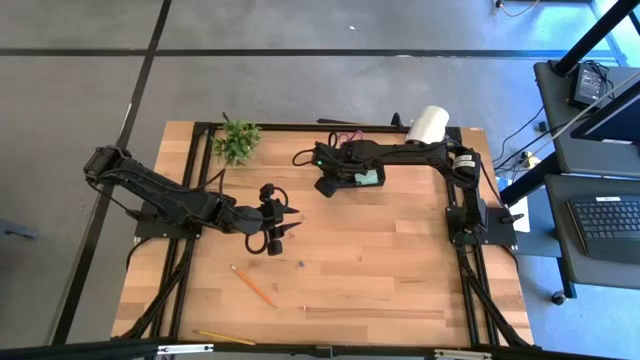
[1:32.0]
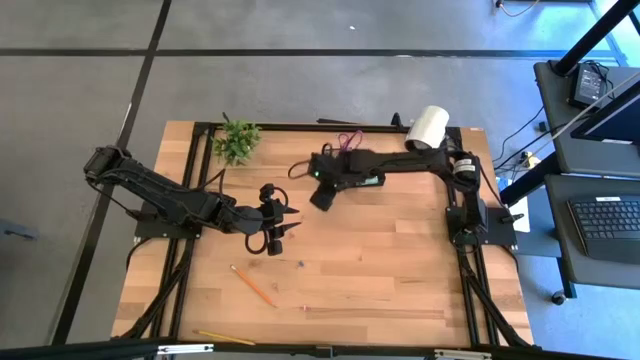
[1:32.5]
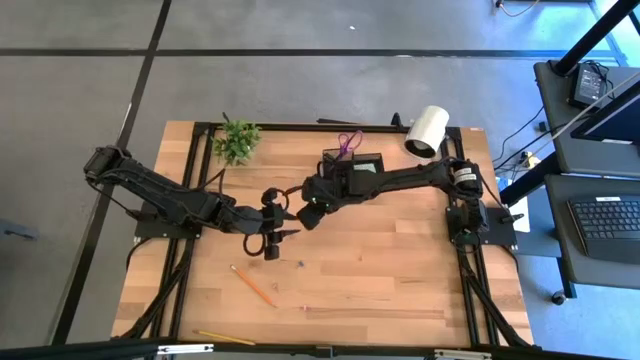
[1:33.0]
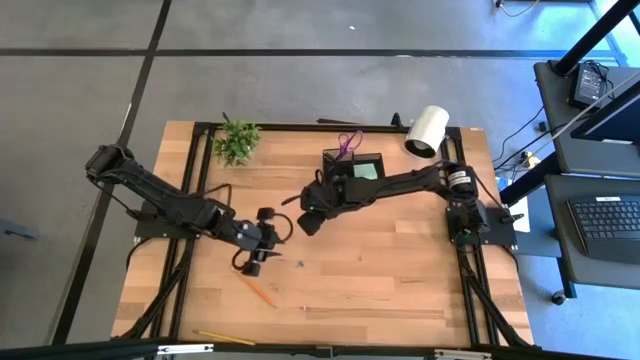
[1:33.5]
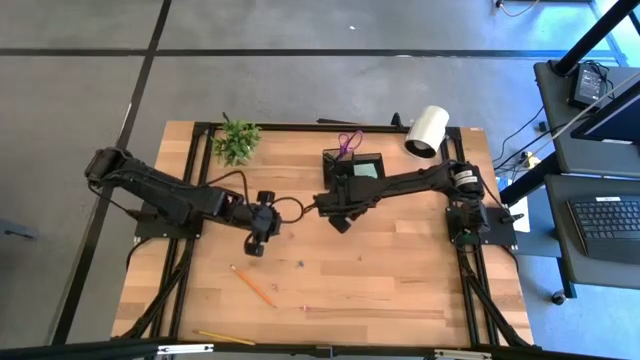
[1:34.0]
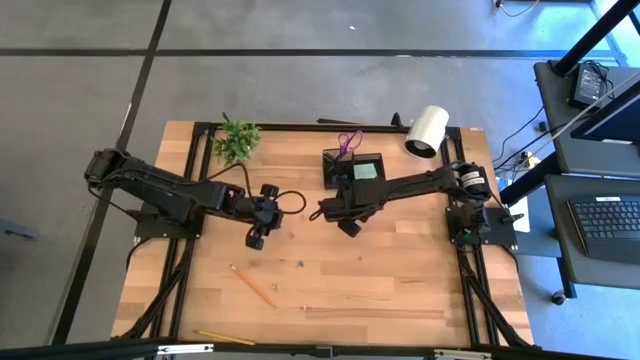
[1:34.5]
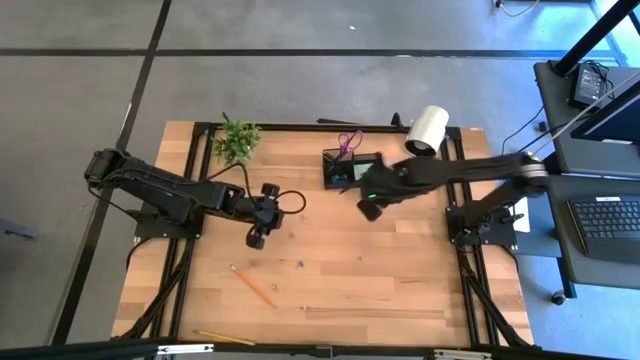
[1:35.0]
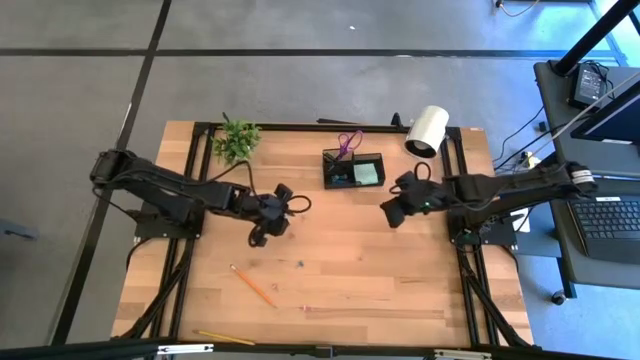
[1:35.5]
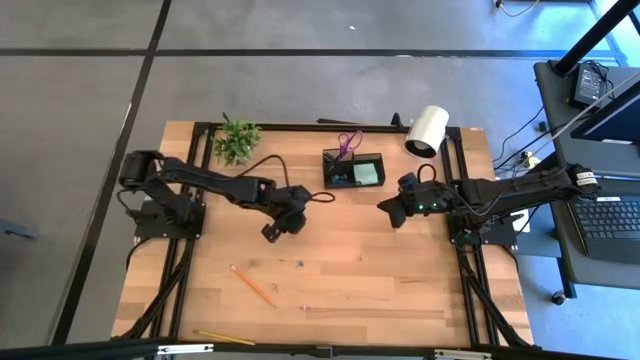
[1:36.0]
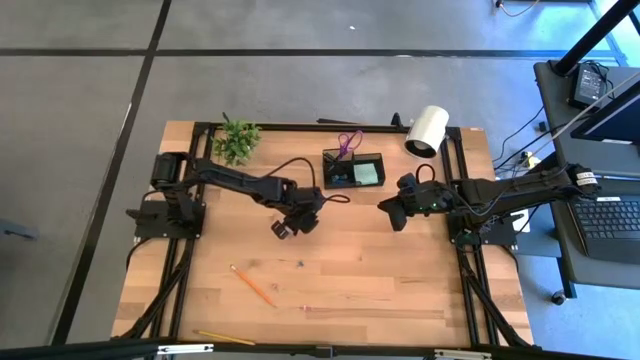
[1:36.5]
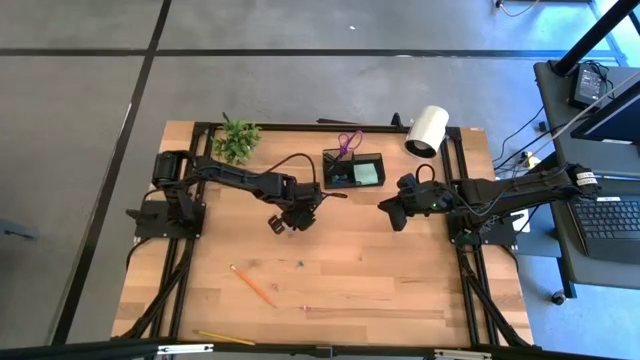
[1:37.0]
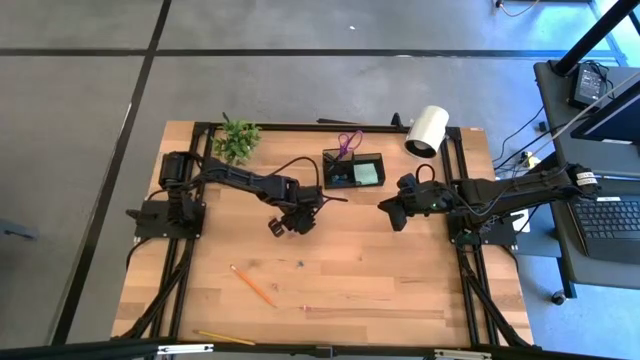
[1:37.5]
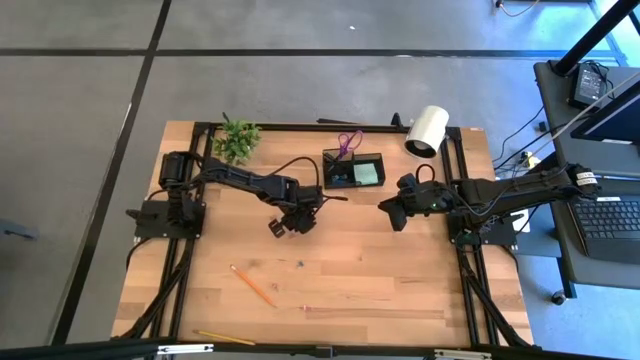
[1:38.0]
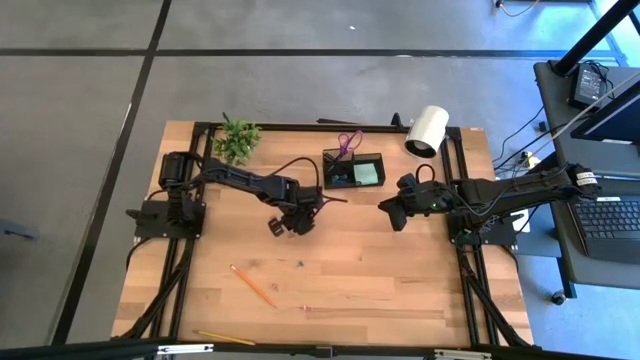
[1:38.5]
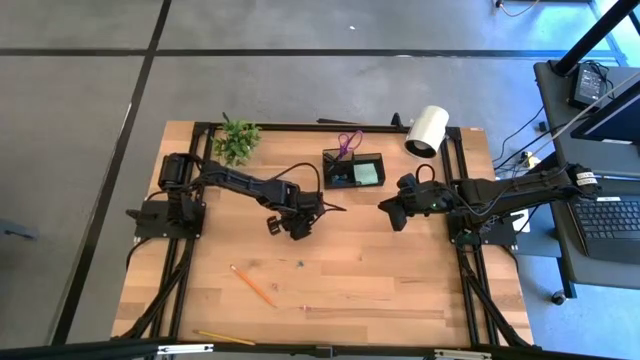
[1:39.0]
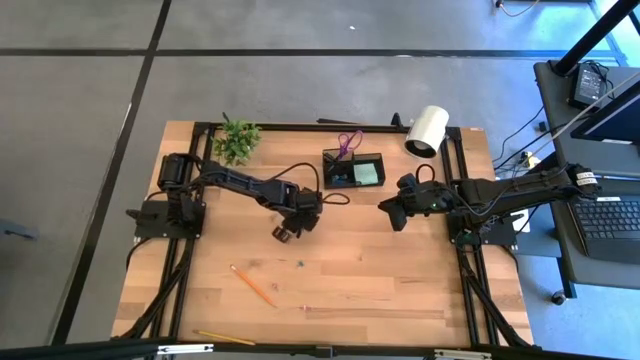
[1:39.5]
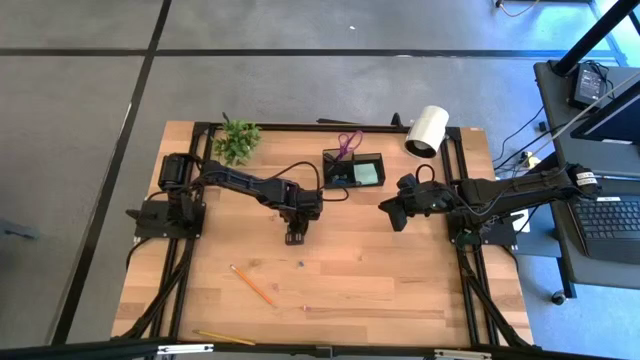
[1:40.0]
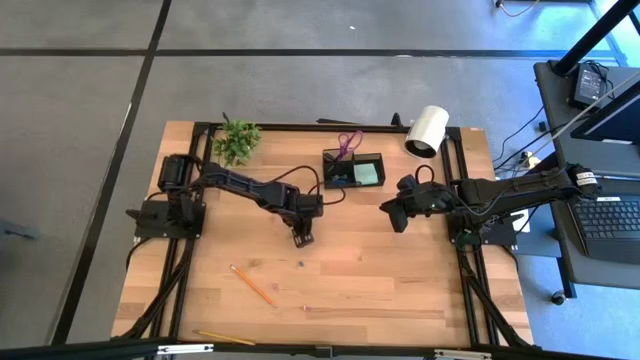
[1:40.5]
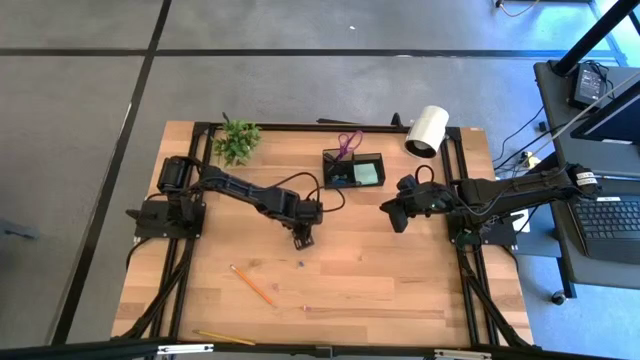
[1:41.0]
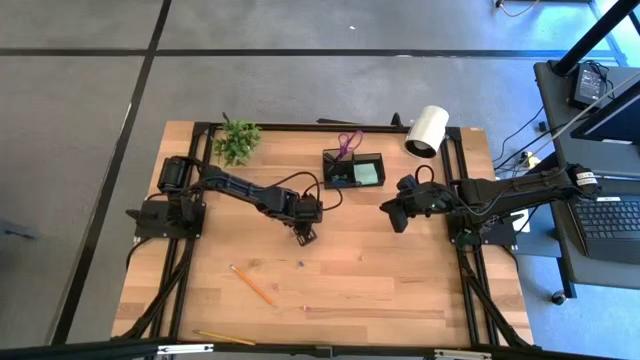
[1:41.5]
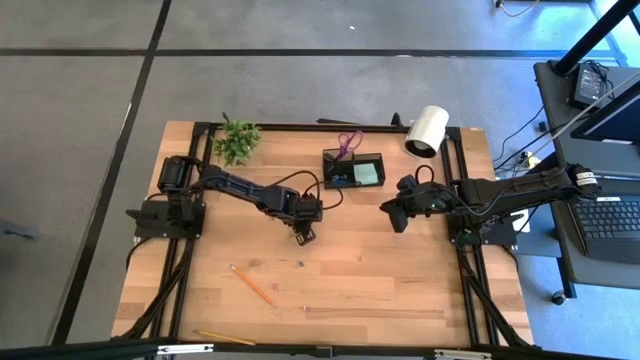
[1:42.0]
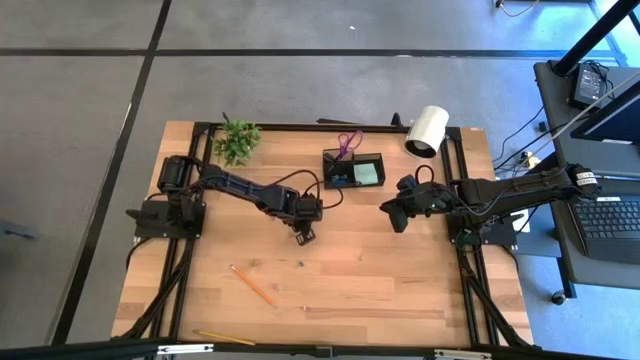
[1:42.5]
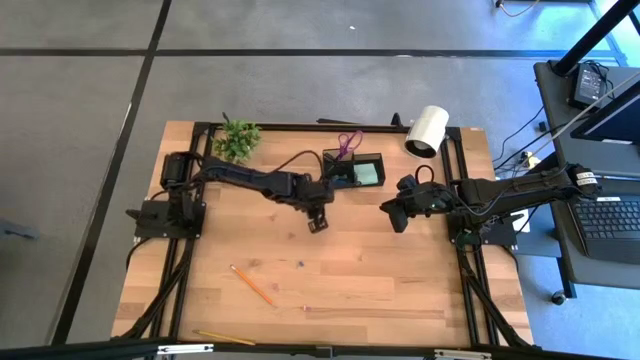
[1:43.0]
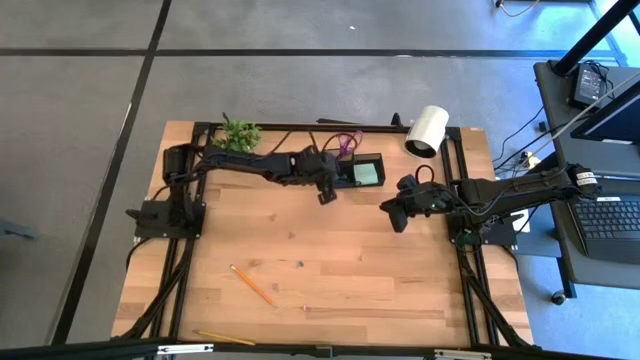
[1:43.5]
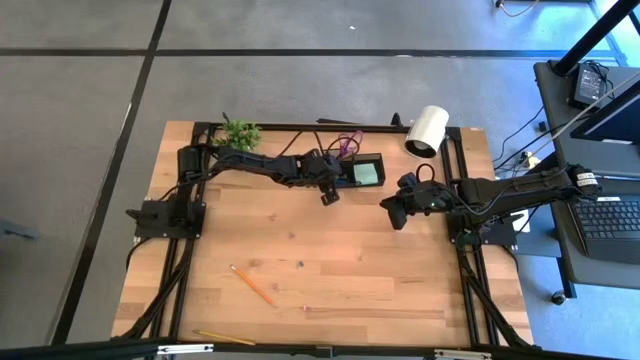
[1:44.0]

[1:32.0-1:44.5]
Task: Pick and place office supplies into organizer
Put the light yellow binder clip into the desk organizer

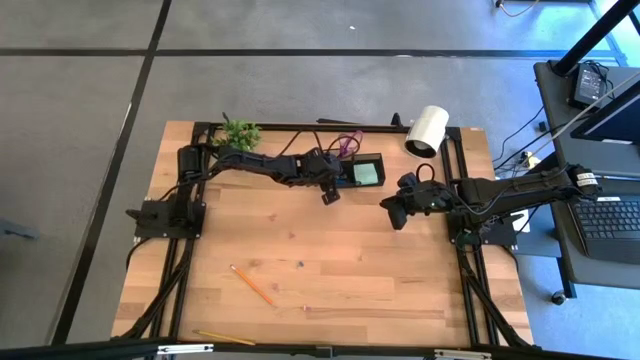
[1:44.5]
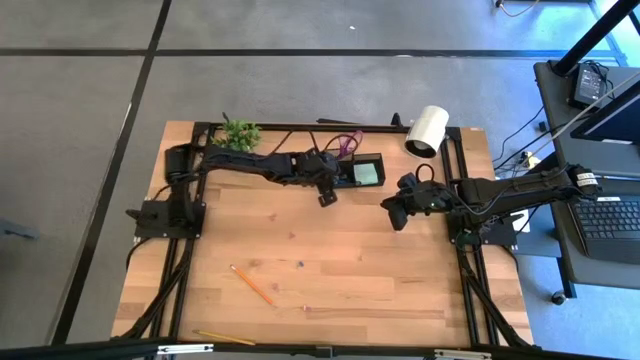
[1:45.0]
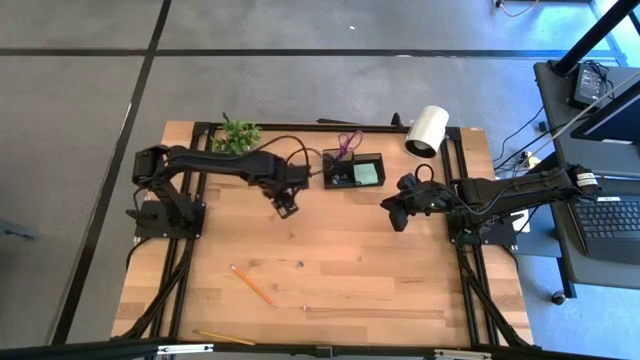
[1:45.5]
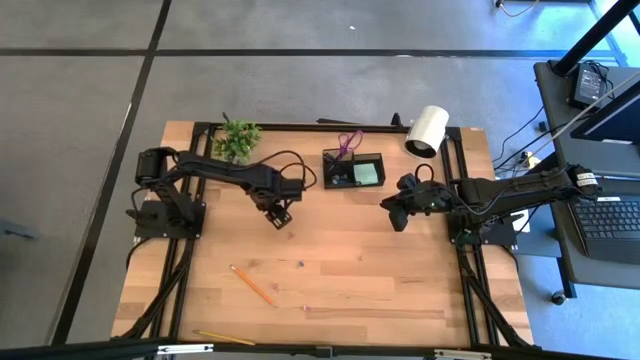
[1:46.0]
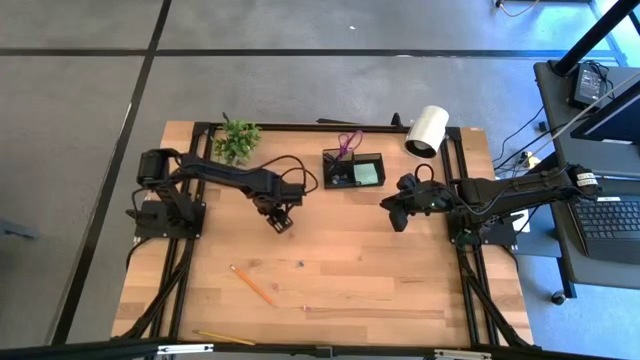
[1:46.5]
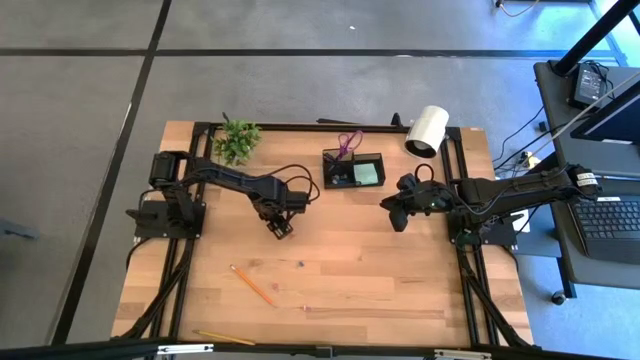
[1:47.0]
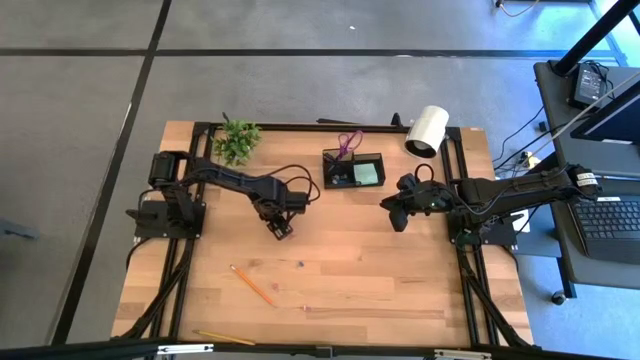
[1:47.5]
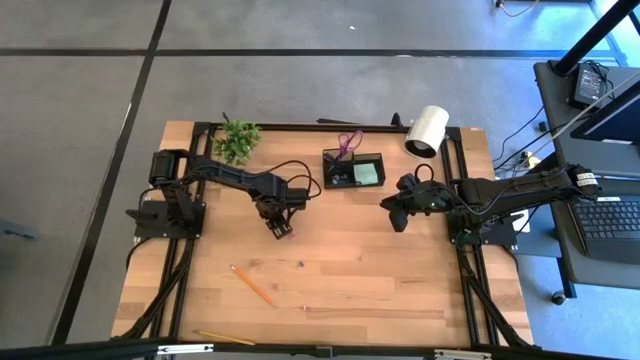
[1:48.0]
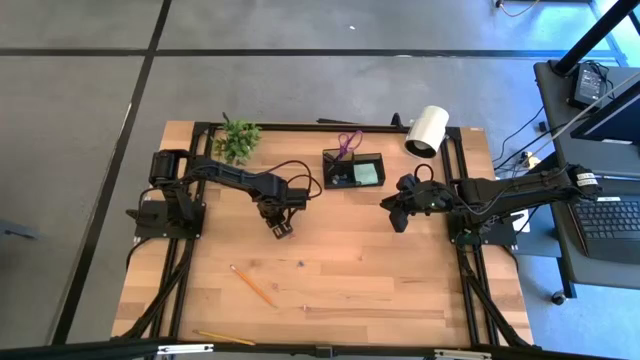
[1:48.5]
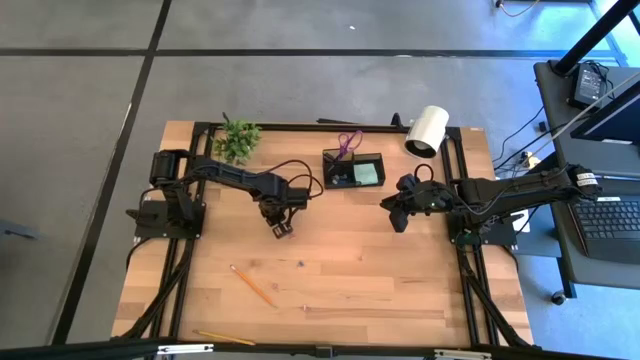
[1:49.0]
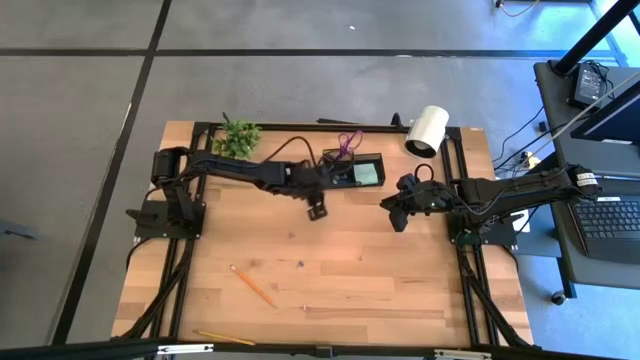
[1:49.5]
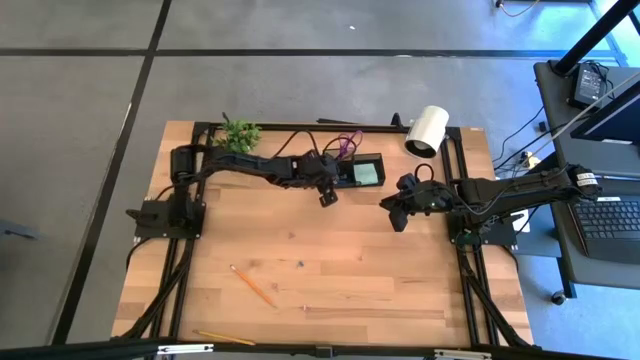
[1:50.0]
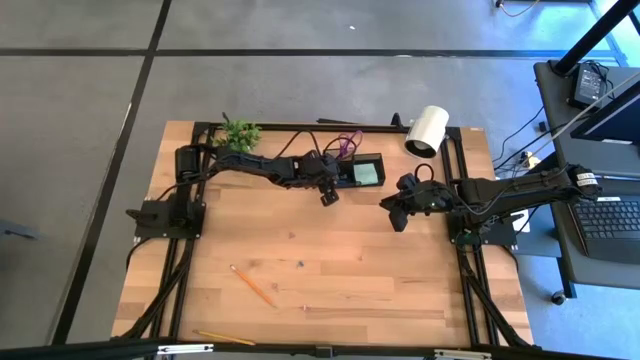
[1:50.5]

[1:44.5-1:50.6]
Put the pink binder clip into the black desk organizer
